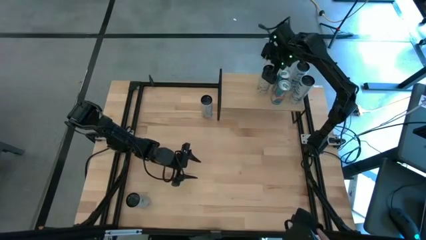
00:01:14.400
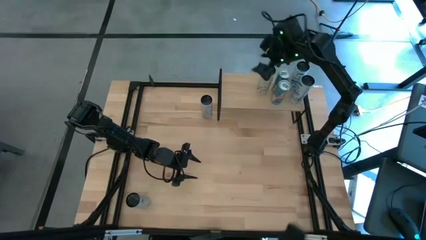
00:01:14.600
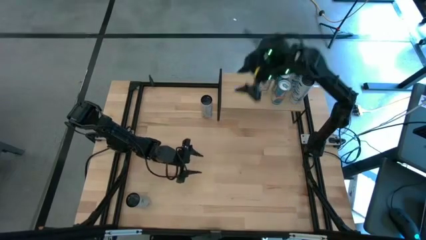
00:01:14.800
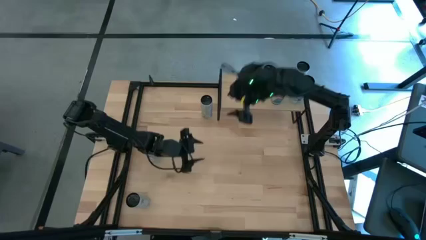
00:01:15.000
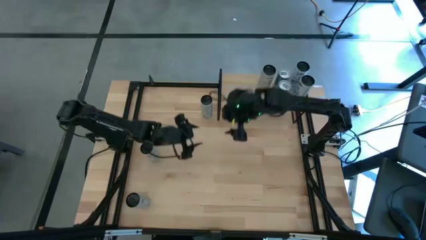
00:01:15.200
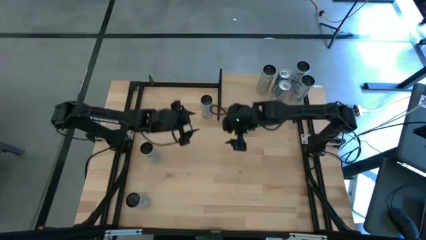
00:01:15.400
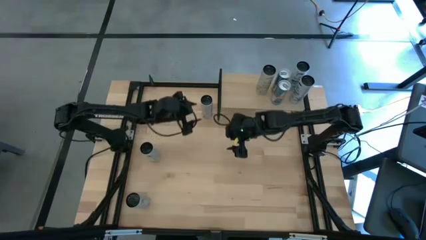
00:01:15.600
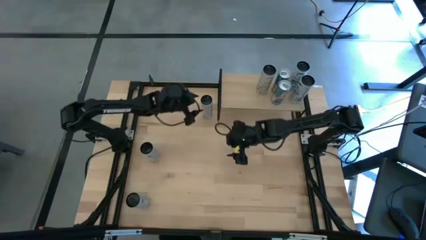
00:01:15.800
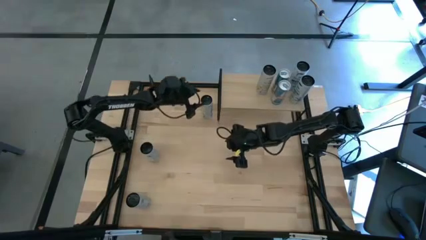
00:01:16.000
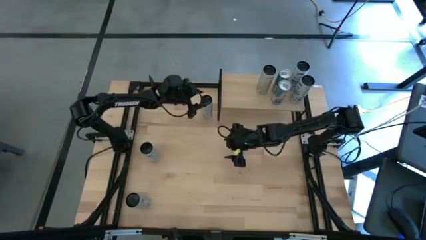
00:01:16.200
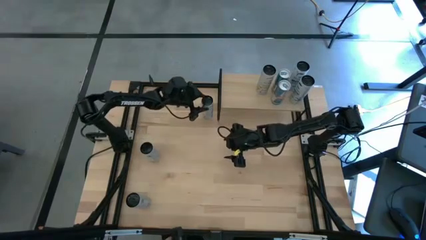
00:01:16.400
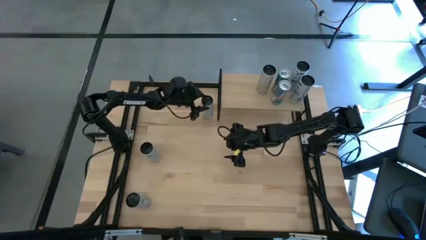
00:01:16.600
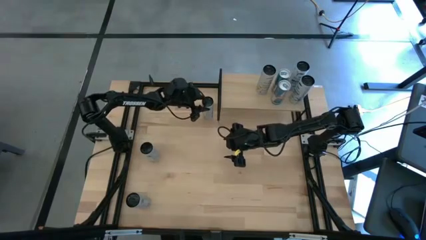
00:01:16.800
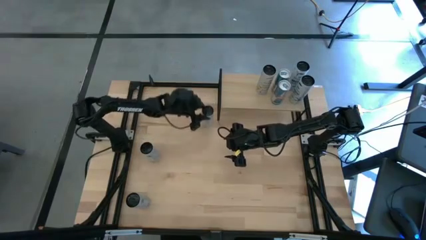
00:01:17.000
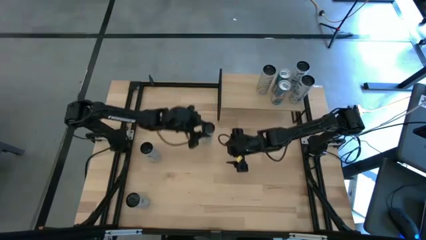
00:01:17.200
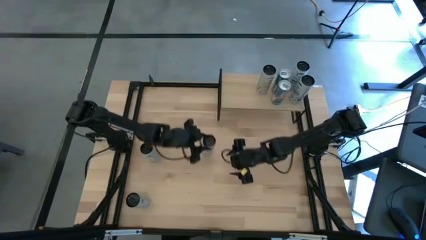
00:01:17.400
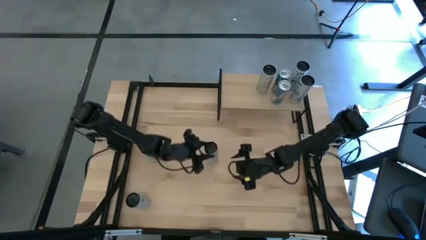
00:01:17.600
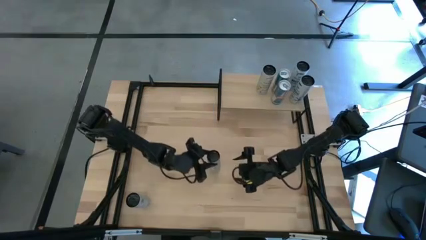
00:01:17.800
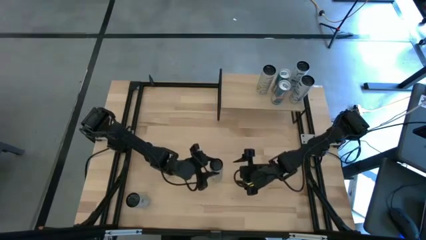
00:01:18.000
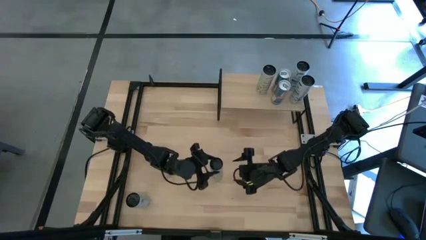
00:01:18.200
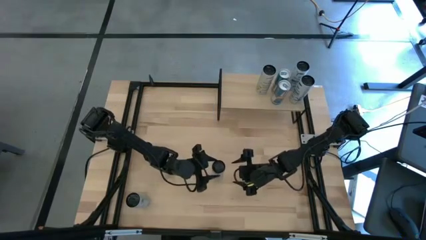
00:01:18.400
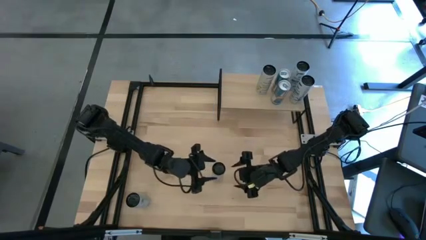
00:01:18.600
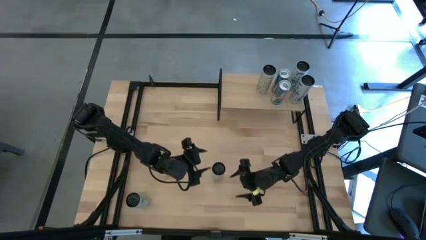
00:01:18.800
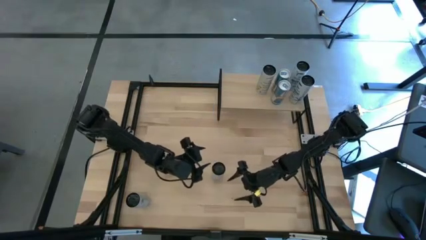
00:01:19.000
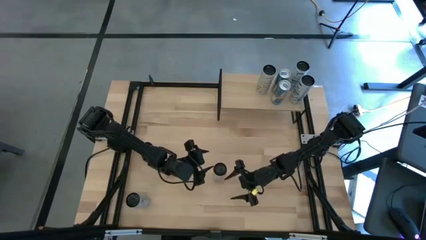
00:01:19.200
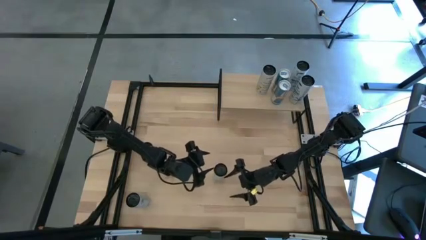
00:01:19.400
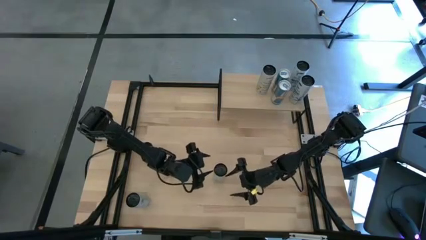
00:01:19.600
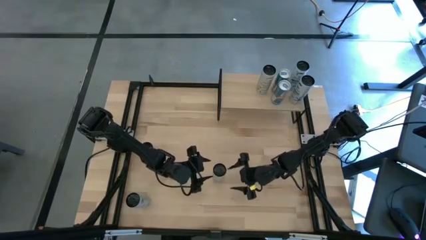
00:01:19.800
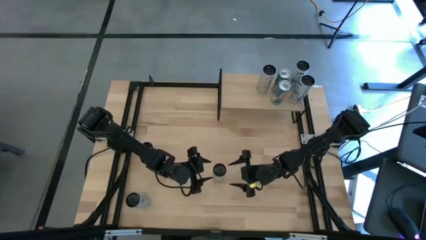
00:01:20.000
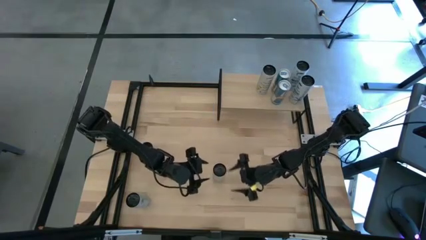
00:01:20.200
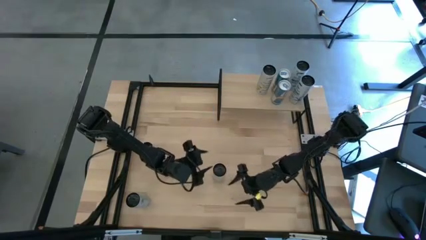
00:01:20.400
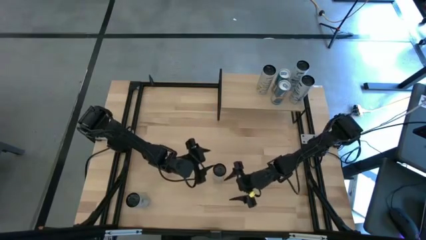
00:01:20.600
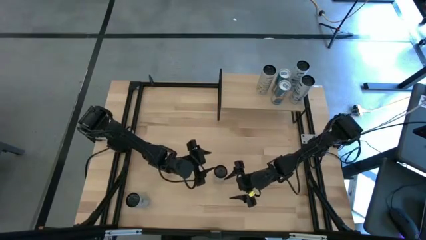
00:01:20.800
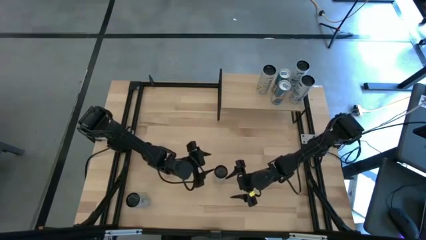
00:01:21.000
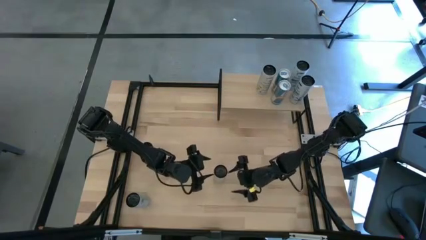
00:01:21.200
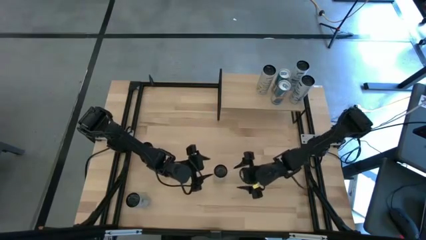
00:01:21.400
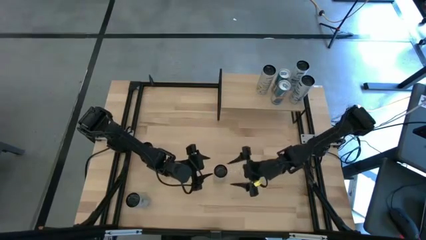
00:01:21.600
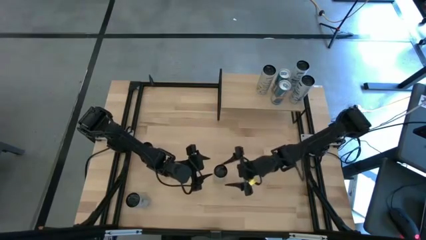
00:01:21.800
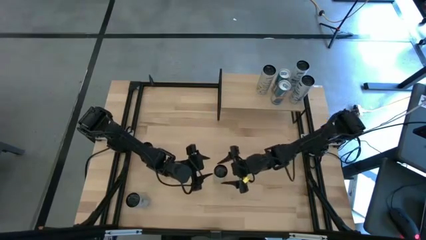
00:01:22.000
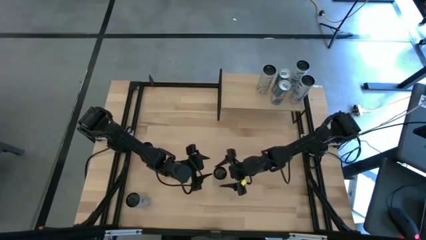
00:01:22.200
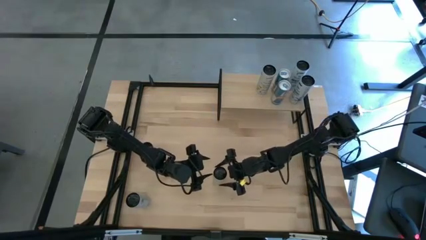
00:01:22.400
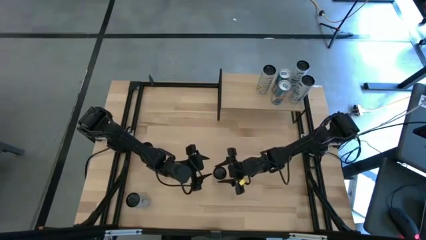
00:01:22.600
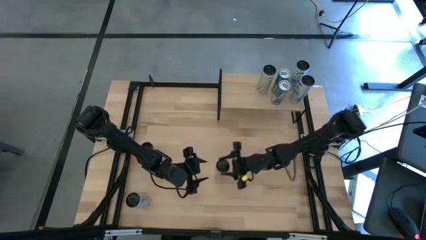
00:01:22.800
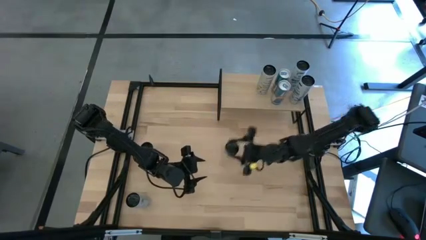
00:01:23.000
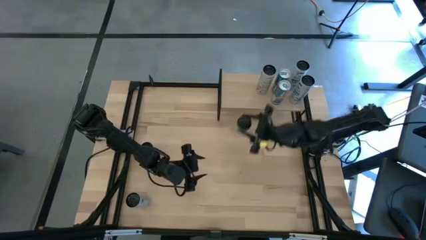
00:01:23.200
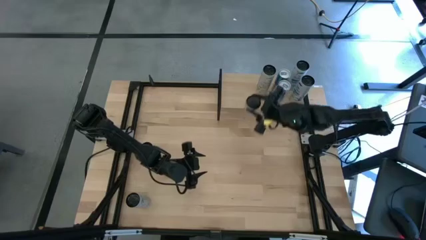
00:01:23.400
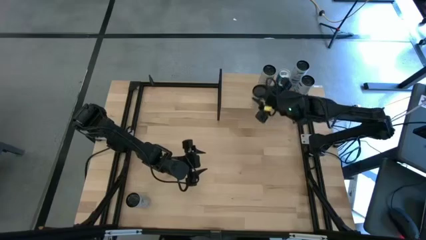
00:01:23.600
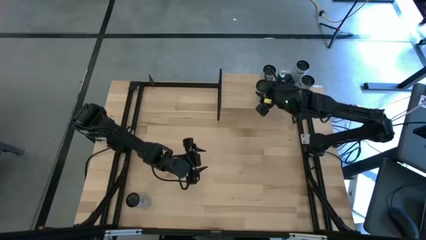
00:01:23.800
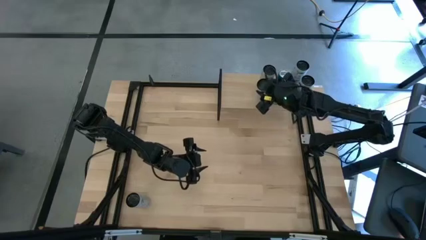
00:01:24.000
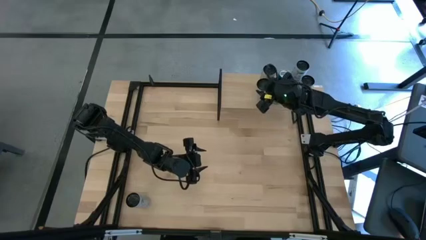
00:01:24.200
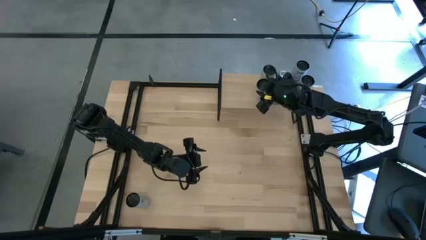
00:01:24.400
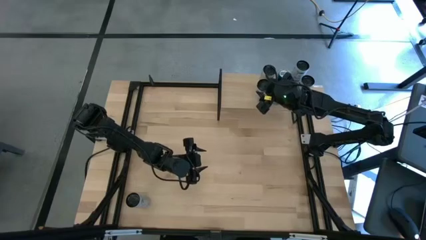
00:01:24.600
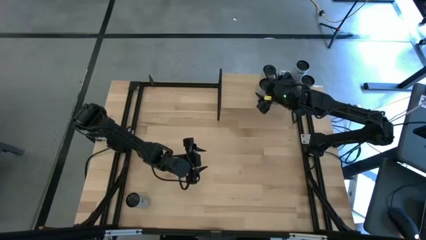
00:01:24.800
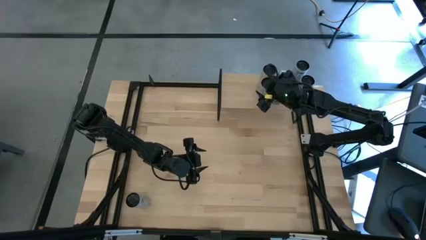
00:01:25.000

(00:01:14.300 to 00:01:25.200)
Task: Place canned beverage on shelf
Put the white and yellow soda can on the shelf aligned with the other white and yellow soda can
